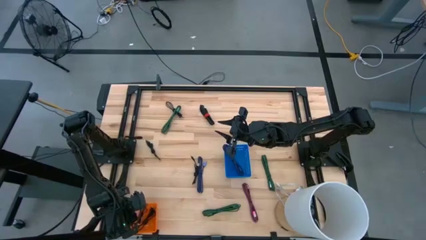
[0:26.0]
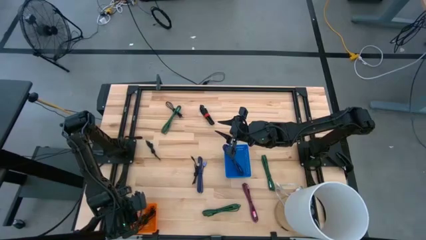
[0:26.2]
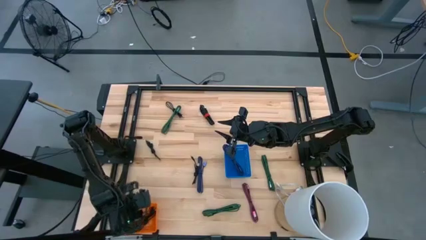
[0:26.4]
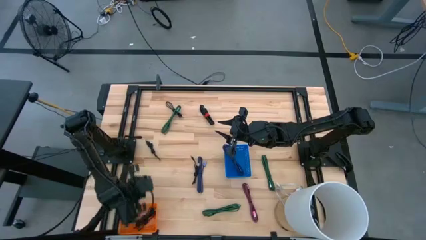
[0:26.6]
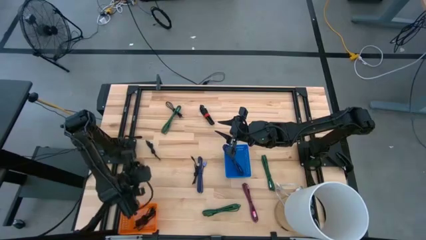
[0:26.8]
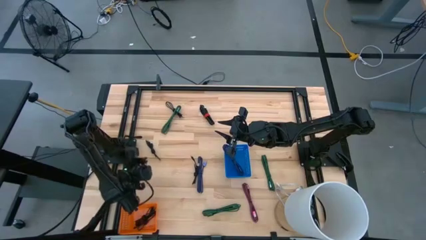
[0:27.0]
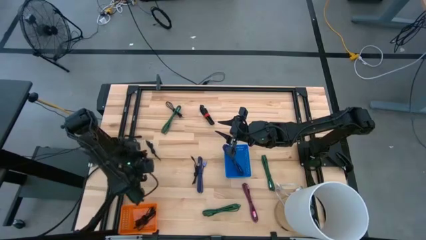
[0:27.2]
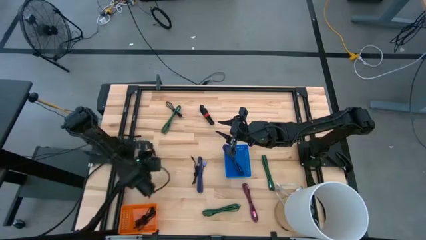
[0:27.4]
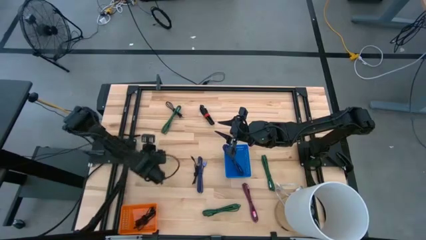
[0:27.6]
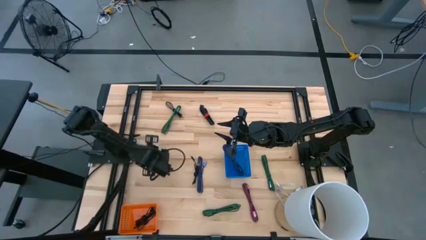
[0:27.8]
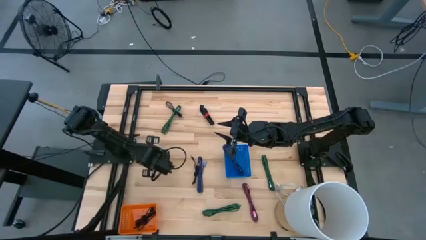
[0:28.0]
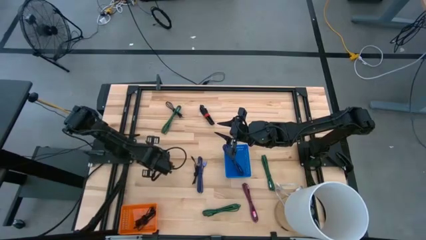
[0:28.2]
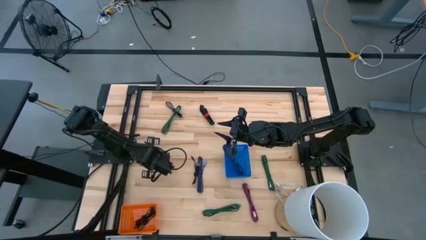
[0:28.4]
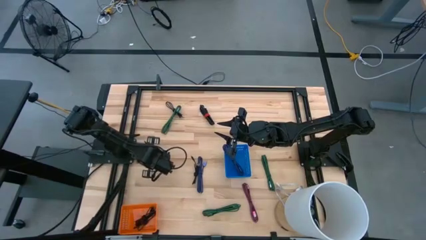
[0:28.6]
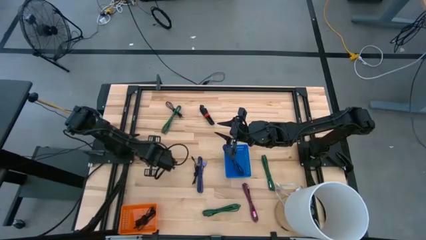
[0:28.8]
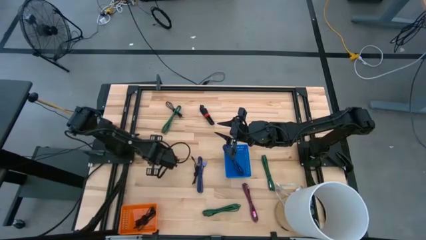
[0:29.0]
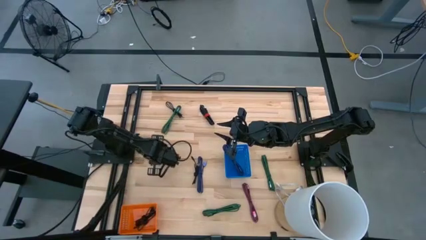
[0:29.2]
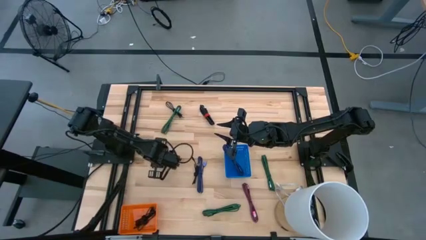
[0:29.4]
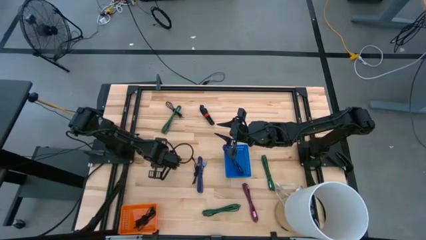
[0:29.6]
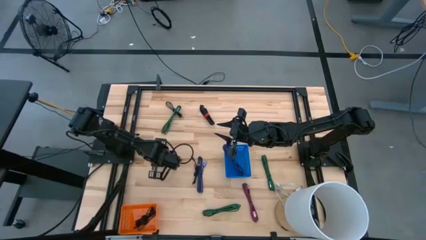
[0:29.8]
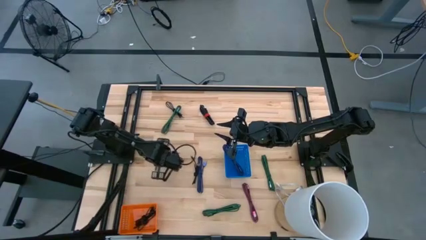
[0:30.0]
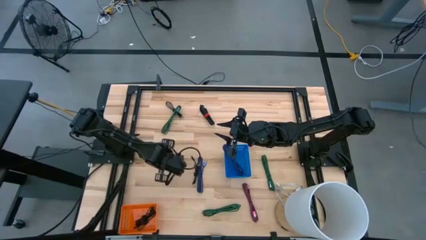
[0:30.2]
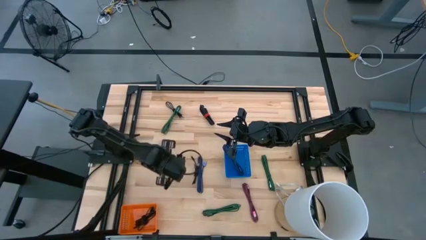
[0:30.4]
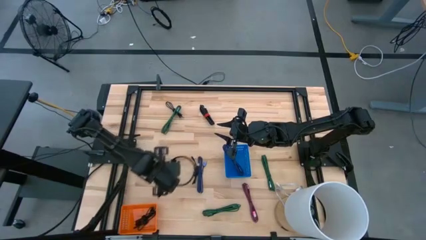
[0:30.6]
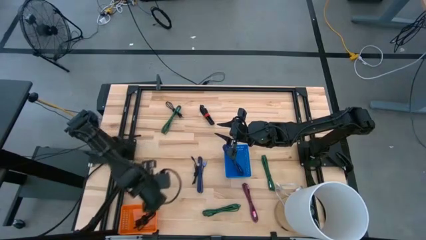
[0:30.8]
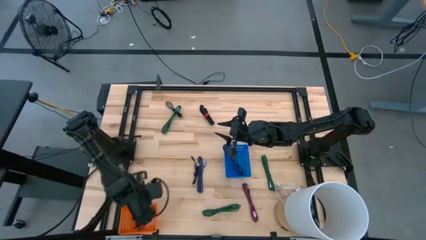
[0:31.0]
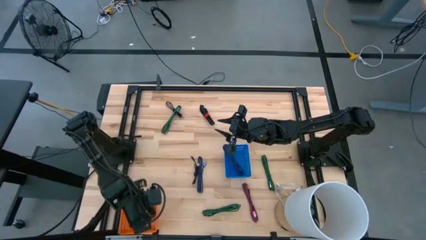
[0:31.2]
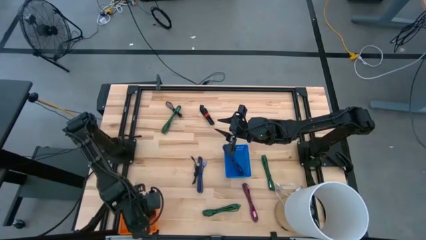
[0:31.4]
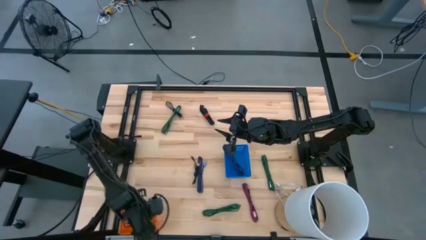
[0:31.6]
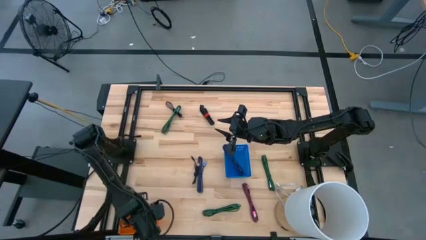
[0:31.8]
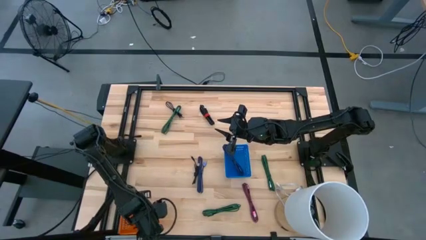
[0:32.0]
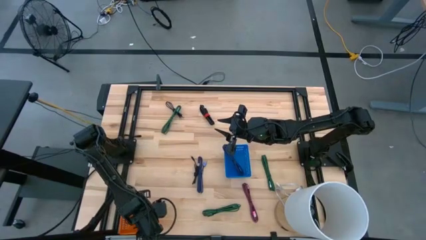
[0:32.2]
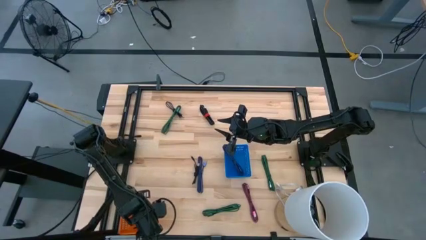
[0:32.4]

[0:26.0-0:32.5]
Task: Pick & Place USB Port
Put the black charger cable into the orange bin

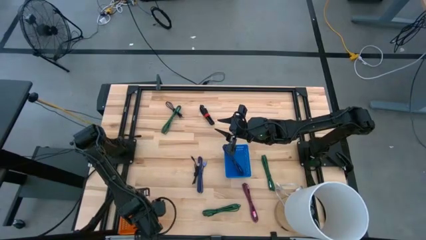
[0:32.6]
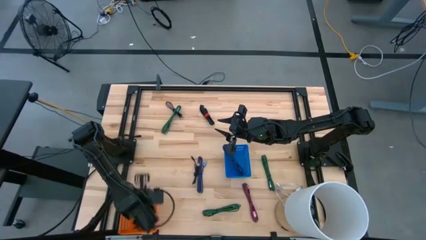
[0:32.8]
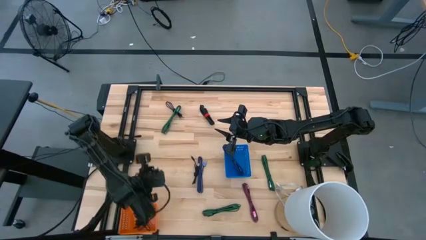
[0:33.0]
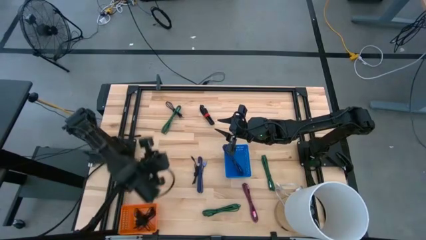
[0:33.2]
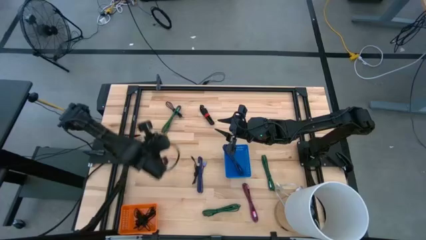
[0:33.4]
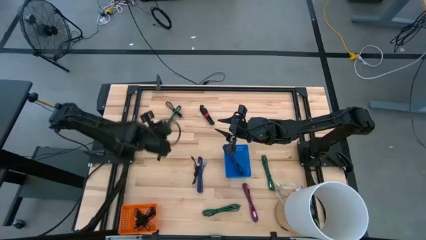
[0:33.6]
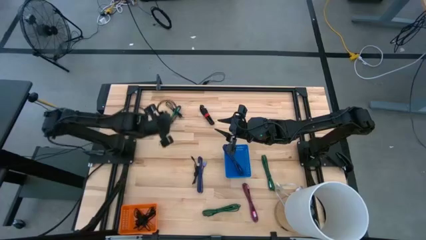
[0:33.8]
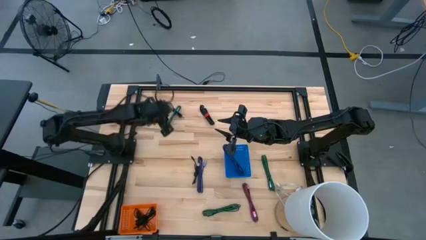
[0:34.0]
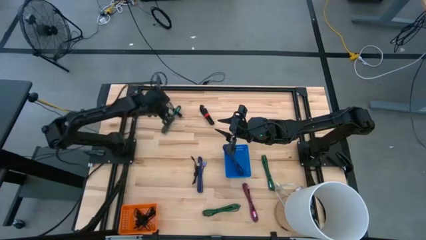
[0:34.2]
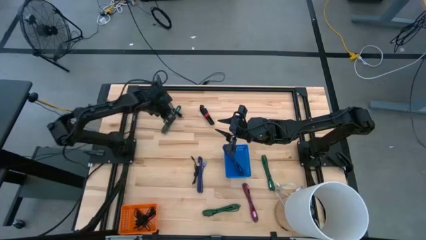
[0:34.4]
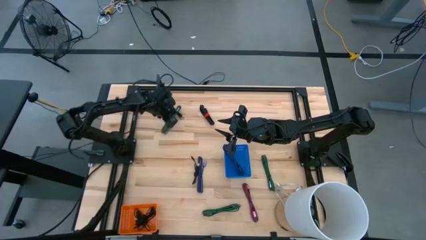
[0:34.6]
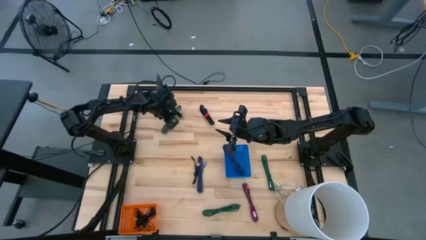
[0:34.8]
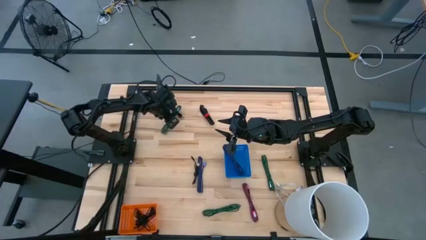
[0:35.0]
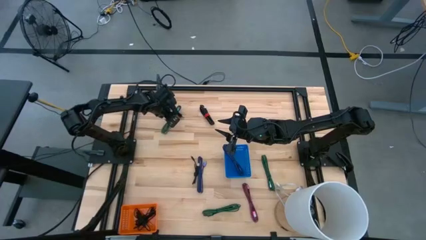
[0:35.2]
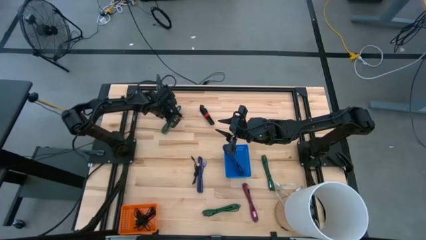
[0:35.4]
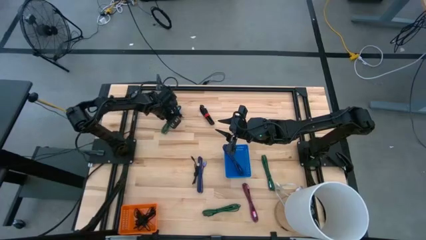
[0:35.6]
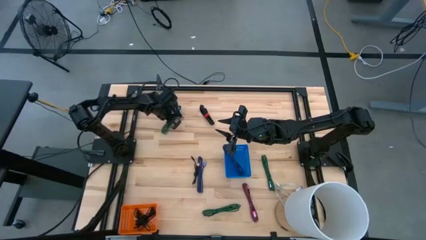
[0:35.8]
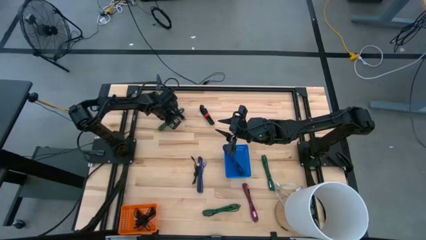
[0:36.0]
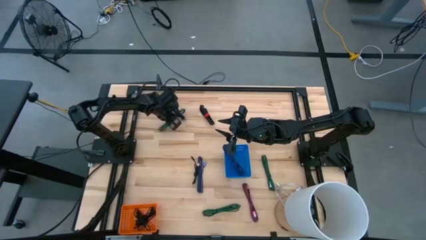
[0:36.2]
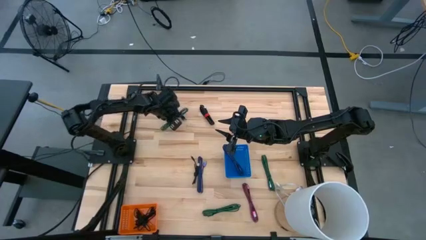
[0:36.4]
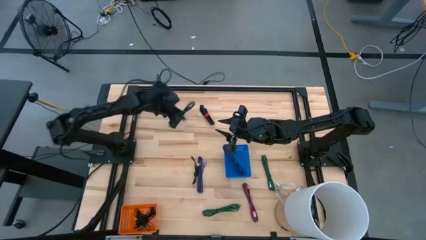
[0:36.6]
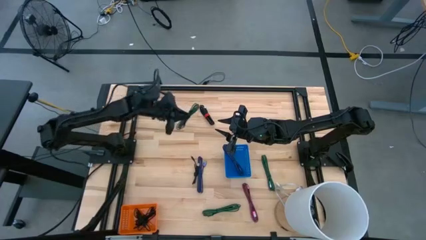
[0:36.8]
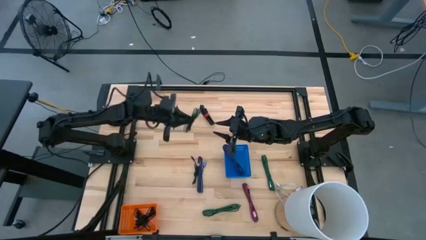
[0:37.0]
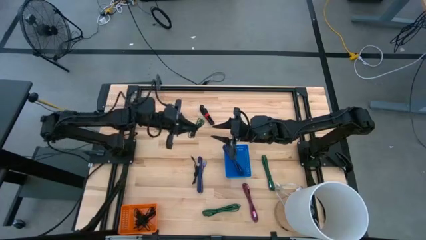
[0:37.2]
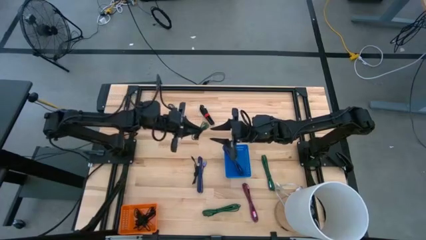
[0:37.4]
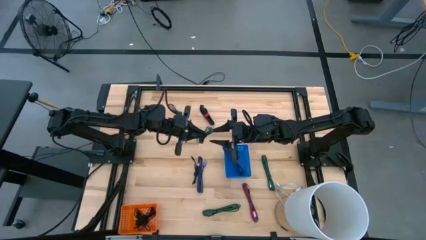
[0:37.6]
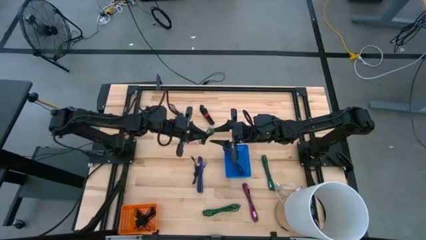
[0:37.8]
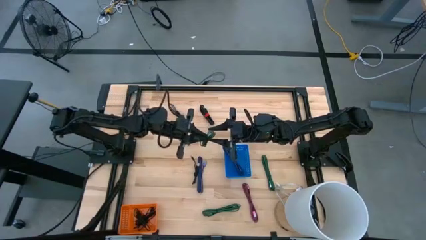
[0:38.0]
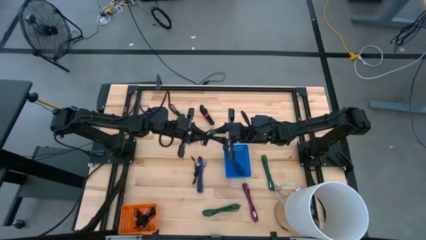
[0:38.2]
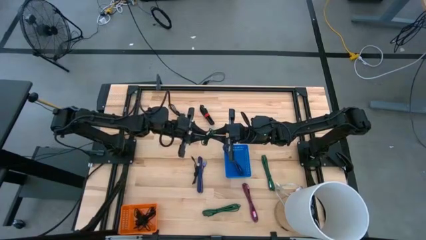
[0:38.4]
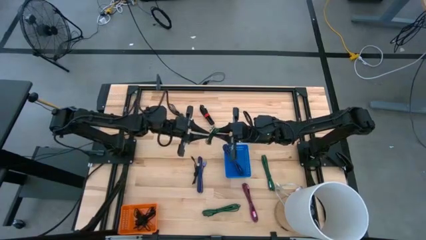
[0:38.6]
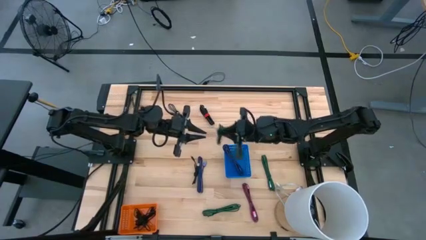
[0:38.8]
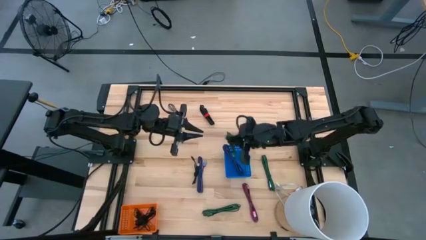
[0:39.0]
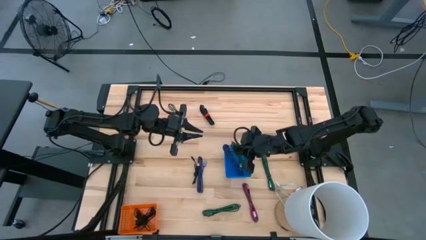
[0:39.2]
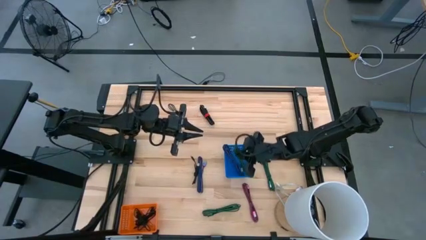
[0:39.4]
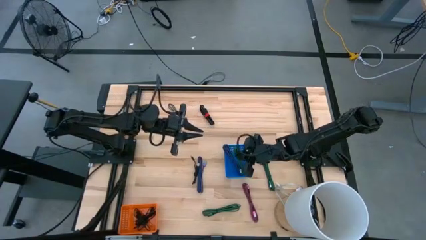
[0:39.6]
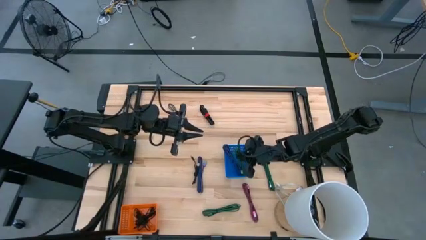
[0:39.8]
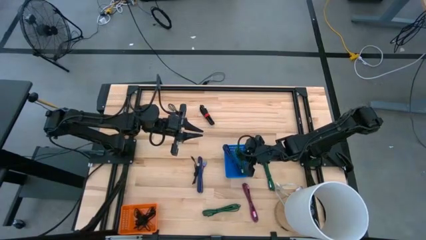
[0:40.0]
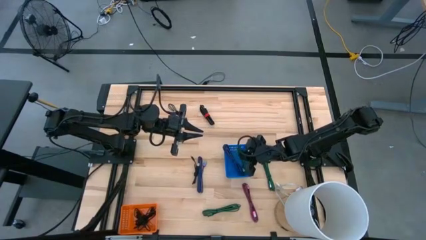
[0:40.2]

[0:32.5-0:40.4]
Put the black and green charger cable into the blue bin

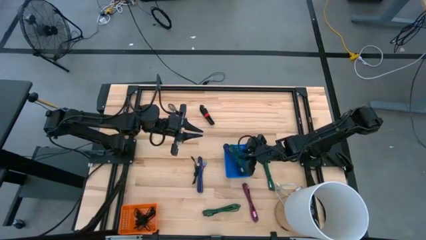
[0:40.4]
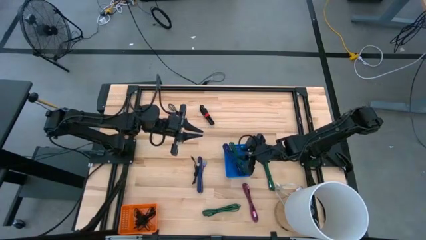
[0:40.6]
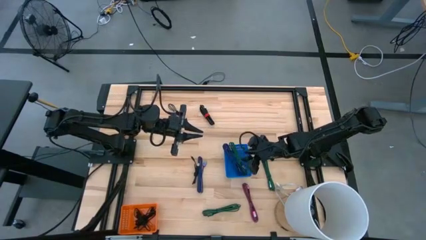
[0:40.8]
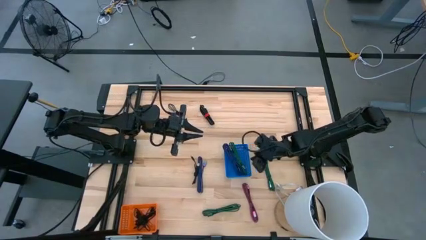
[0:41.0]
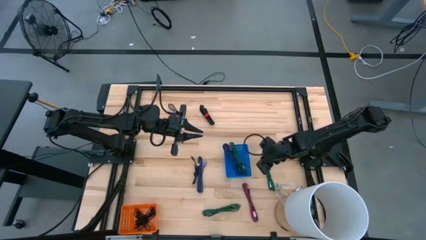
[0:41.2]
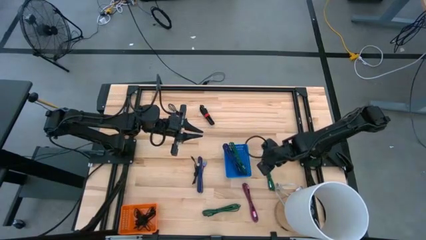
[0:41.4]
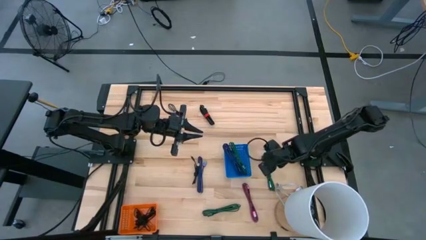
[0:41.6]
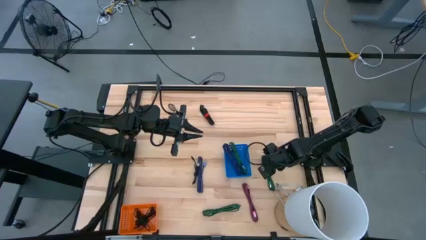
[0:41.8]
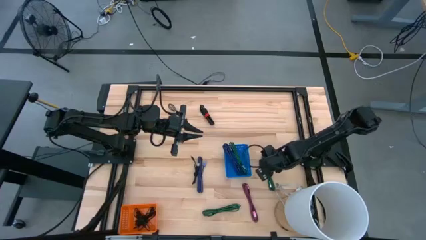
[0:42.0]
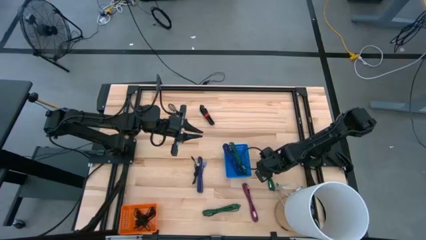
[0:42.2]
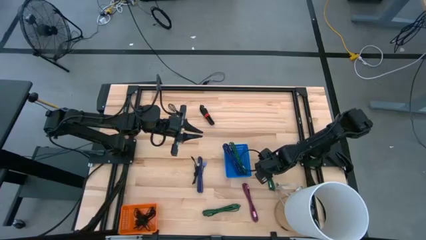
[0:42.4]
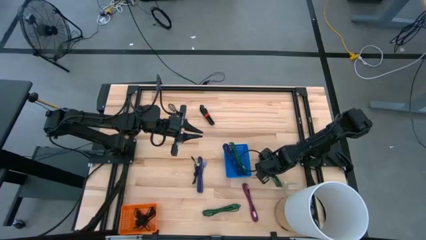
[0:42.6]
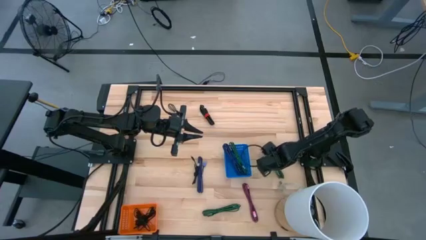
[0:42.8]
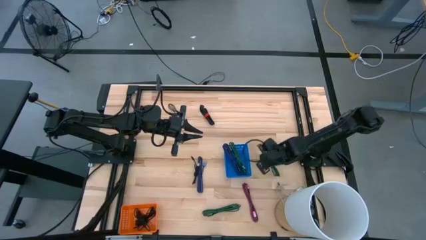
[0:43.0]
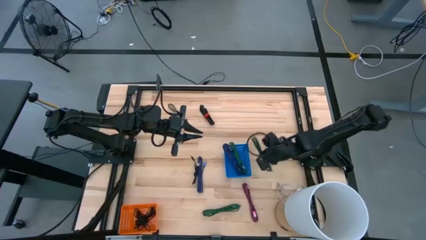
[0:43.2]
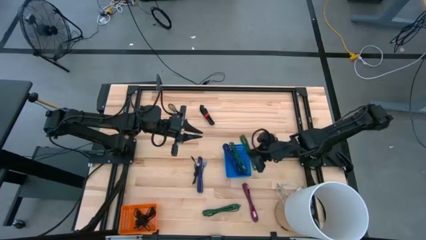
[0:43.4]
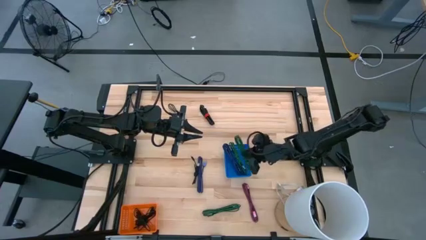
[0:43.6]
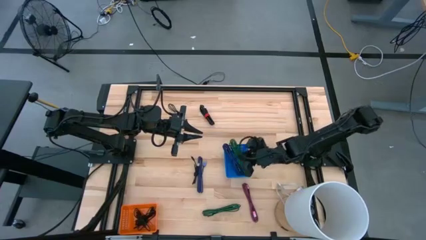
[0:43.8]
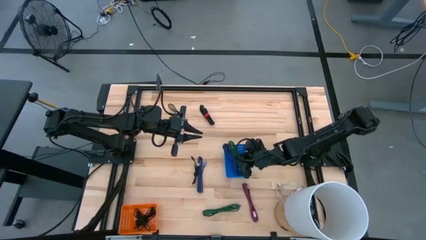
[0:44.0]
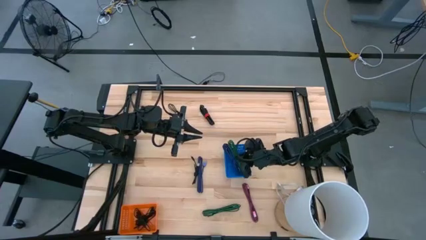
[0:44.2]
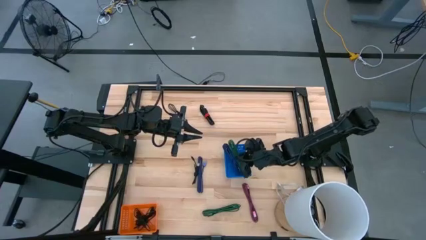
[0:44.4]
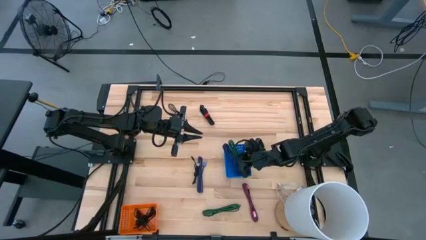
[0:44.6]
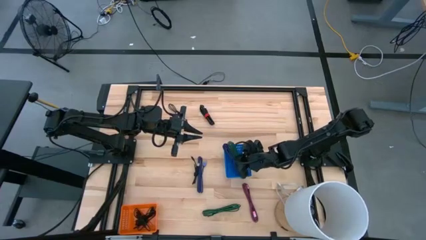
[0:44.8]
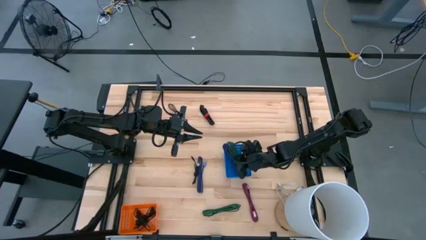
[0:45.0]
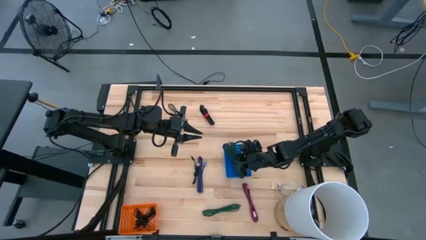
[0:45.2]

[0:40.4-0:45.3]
Put the black and green charger cable into the blue bin
